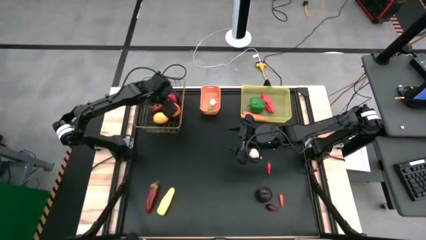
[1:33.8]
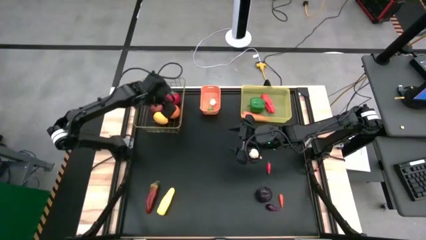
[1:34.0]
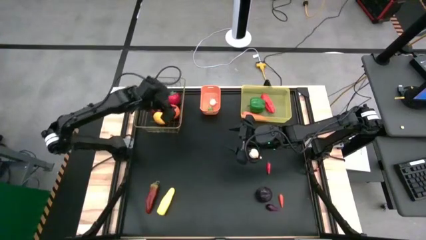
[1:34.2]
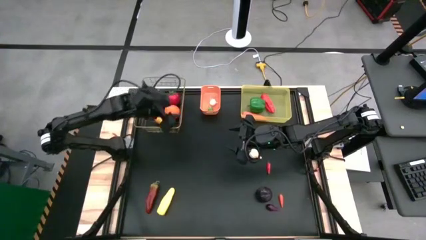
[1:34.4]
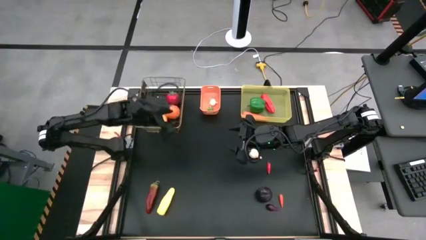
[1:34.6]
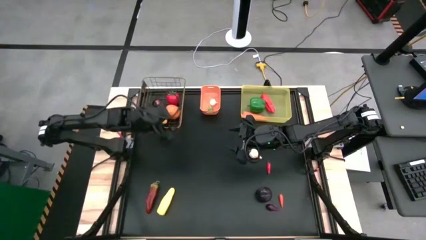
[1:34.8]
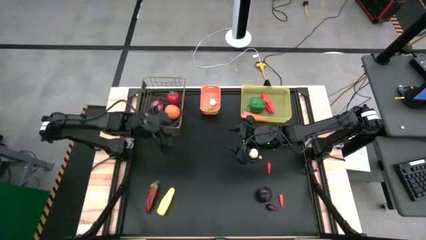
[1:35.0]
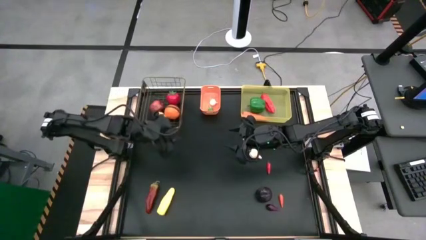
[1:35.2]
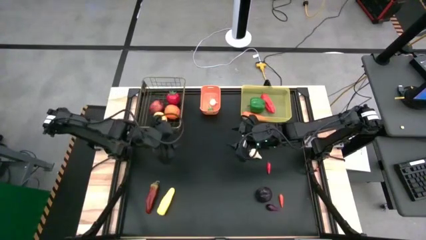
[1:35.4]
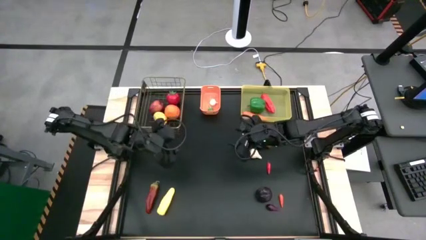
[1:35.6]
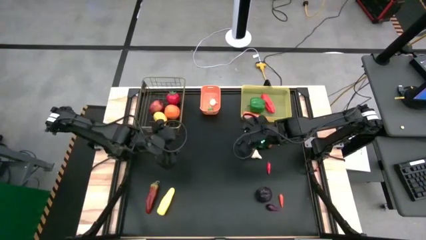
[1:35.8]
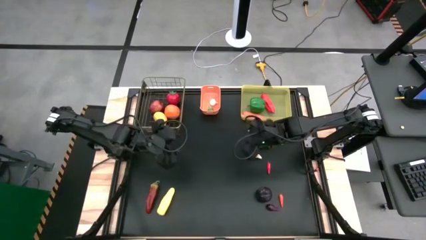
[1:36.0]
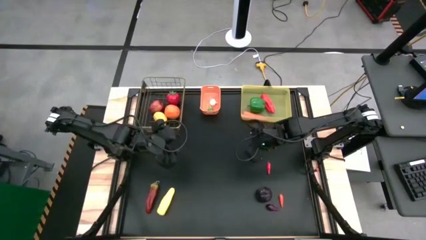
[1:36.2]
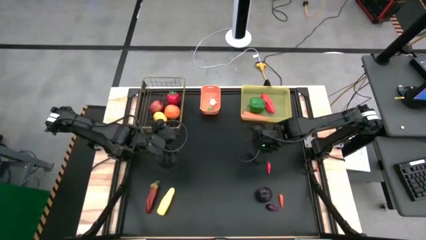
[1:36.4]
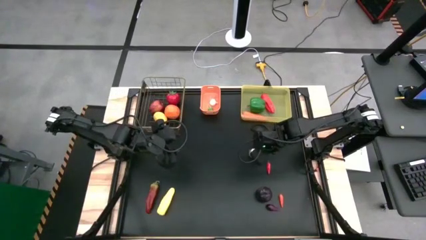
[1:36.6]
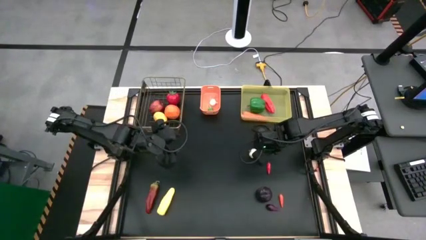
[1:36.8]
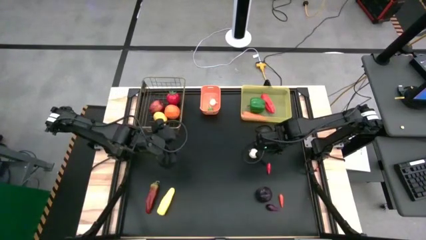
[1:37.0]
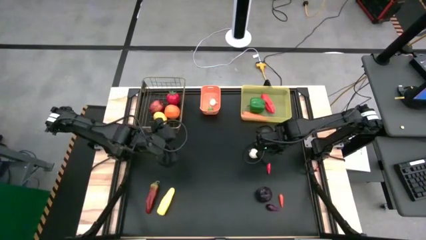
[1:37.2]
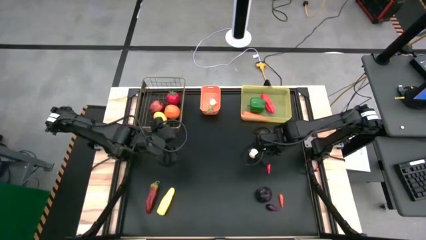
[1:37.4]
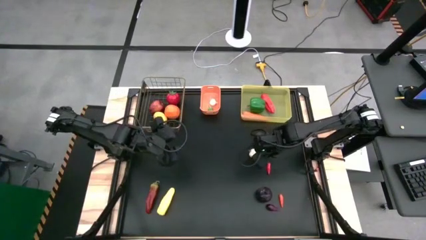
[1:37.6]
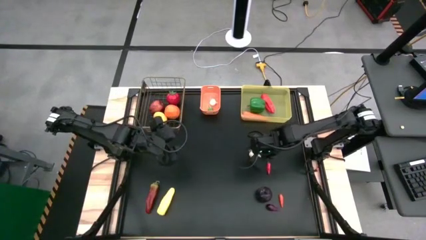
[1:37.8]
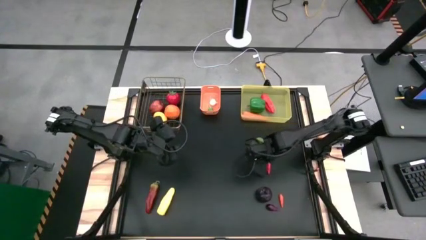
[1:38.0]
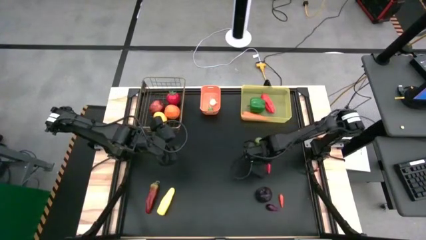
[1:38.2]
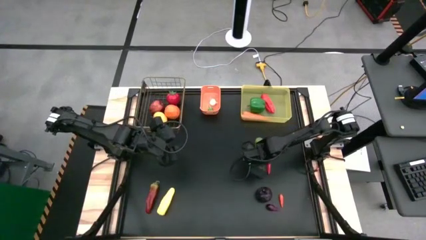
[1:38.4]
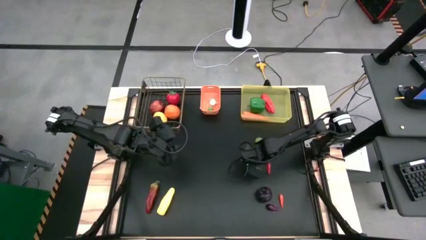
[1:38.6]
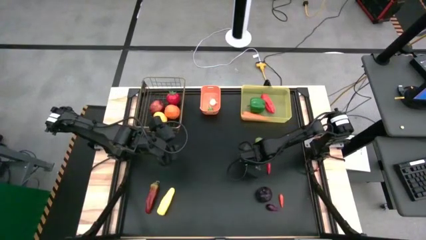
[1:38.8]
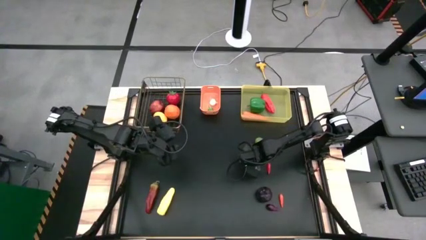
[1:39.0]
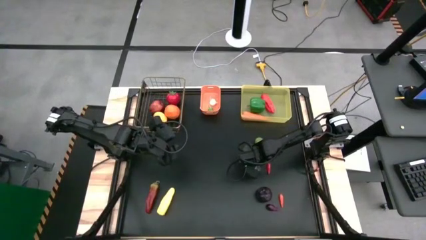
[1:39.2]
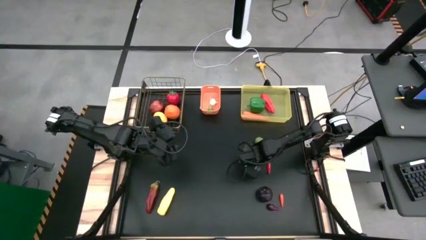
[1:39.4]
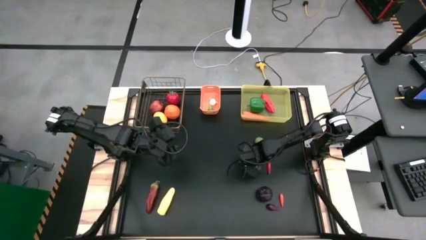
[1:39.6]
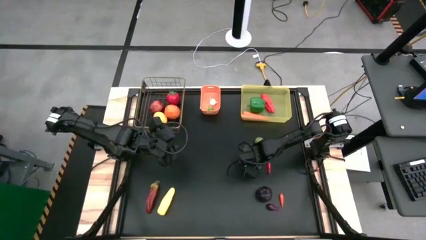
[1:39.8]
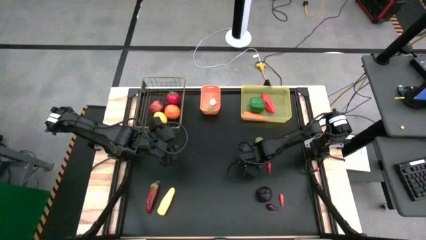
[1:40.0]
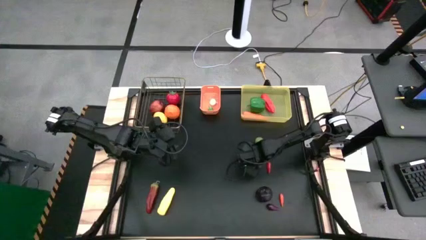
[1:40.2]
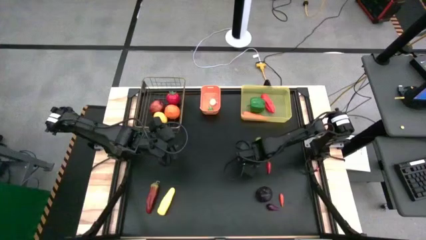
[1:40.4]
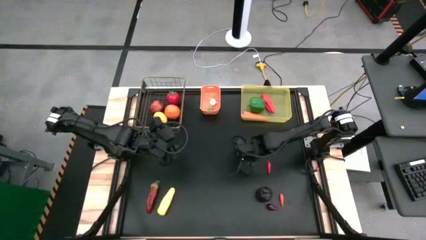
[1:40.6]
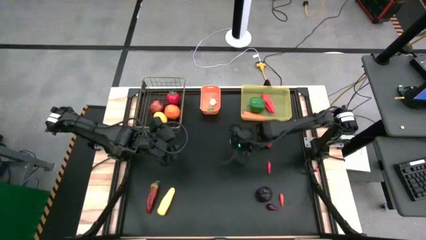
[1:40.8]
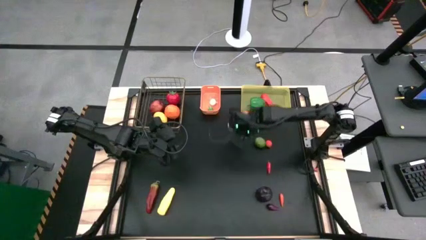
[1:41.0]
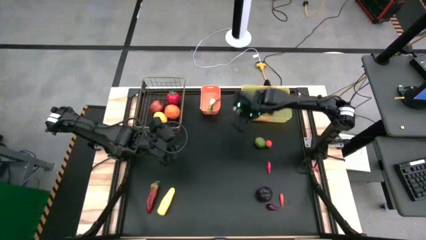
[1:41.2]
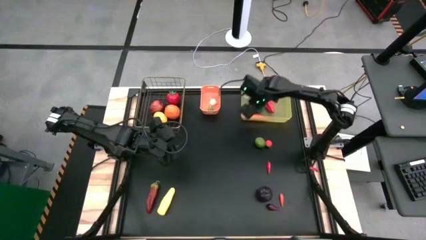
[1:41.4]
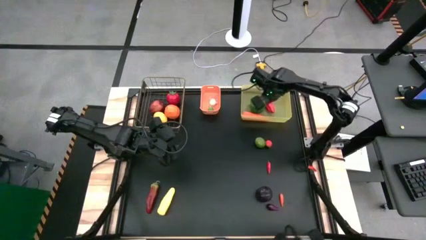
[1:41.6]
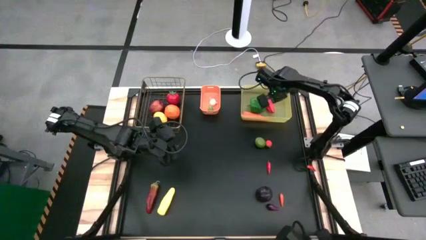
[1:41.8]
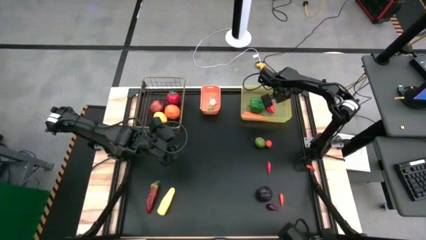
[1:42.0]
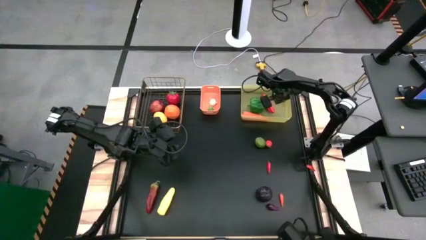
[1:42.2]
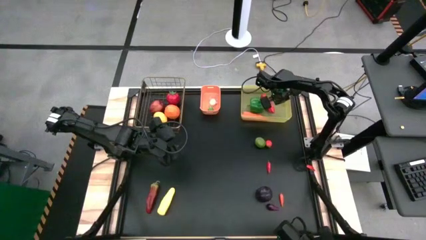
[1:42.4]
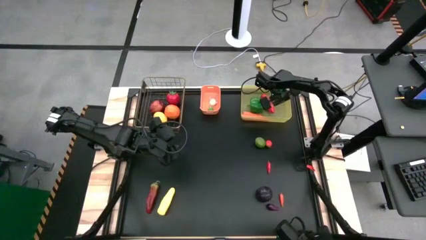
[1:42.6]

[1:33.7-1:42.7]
Task: Sort produce into baskets
Put the white garlic into the yellow bin

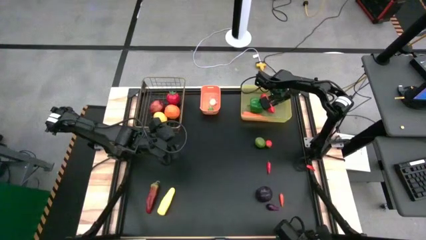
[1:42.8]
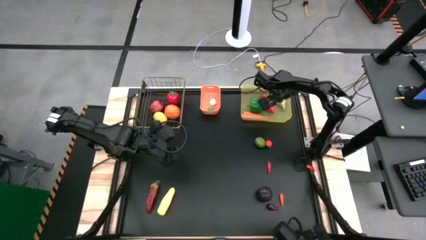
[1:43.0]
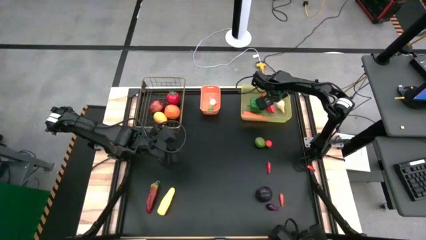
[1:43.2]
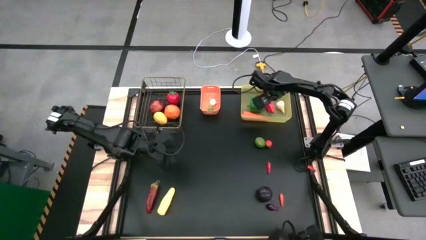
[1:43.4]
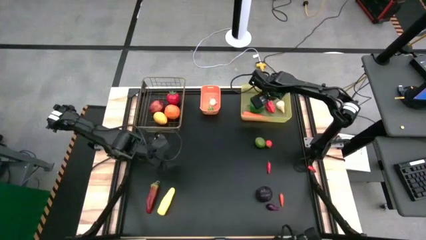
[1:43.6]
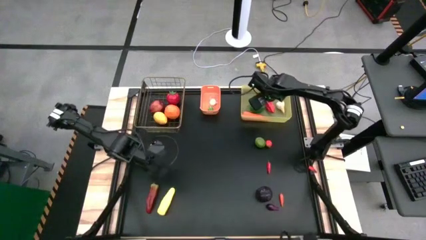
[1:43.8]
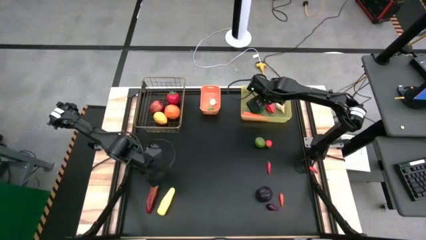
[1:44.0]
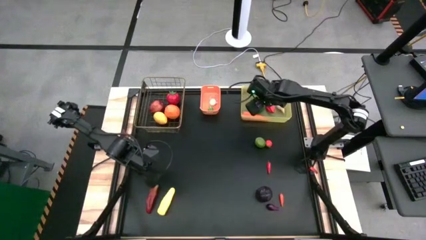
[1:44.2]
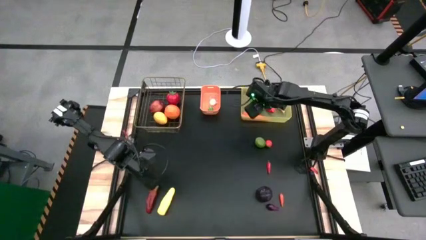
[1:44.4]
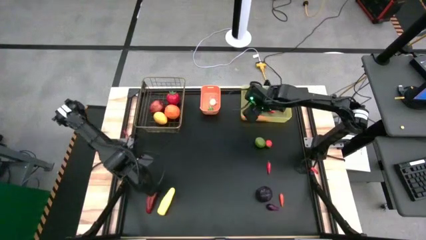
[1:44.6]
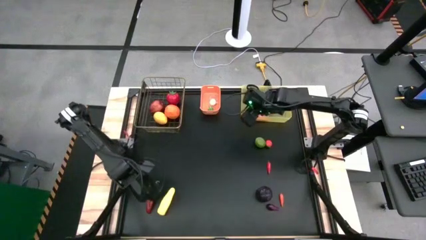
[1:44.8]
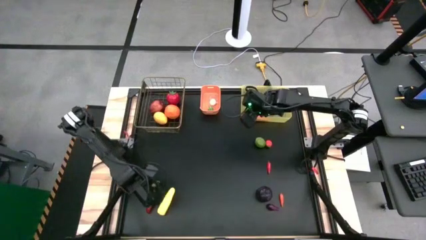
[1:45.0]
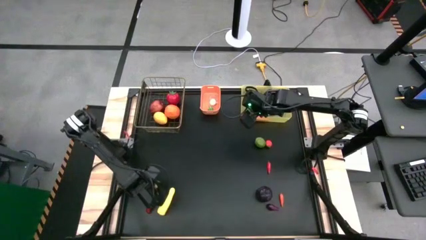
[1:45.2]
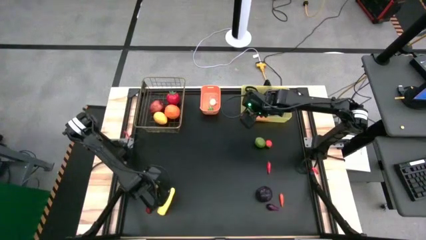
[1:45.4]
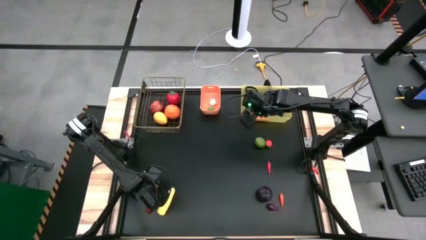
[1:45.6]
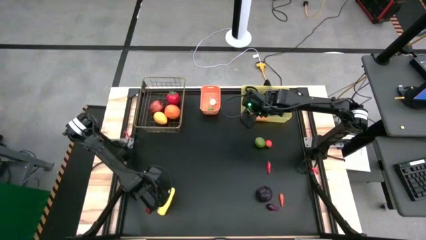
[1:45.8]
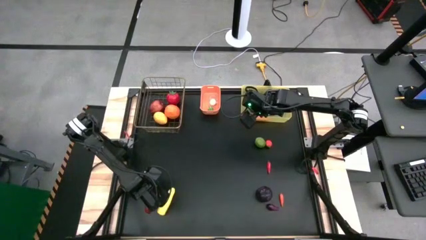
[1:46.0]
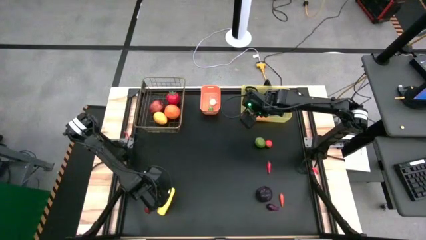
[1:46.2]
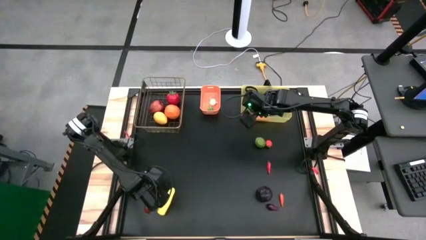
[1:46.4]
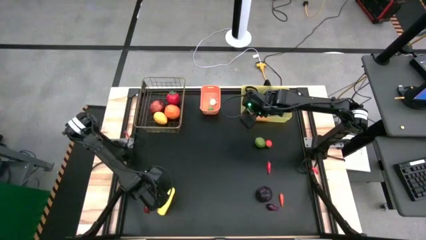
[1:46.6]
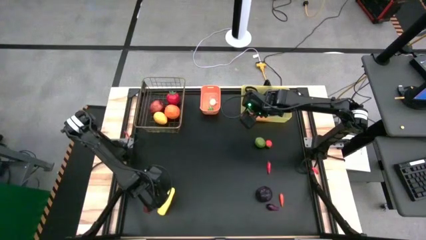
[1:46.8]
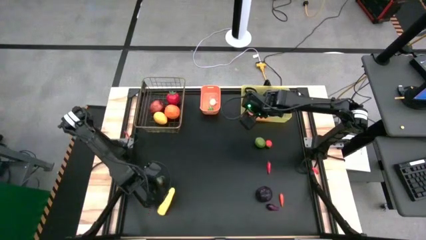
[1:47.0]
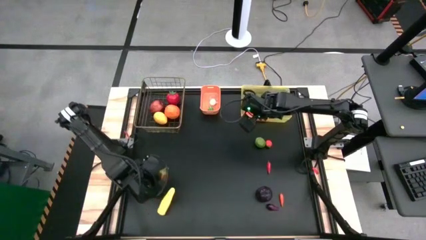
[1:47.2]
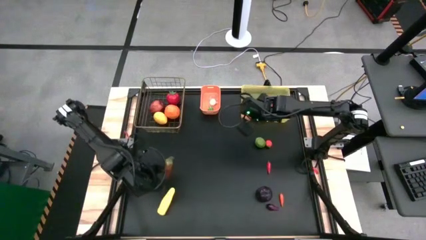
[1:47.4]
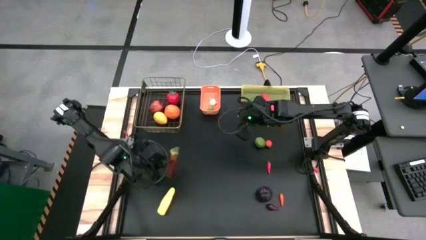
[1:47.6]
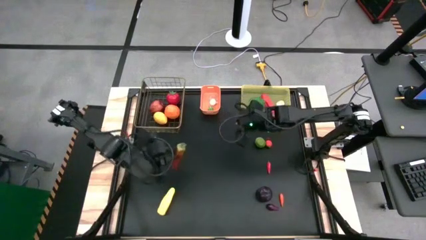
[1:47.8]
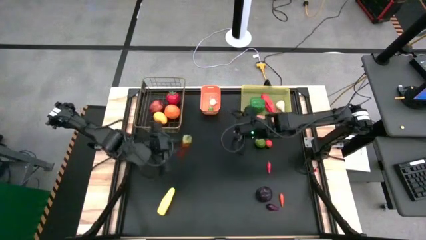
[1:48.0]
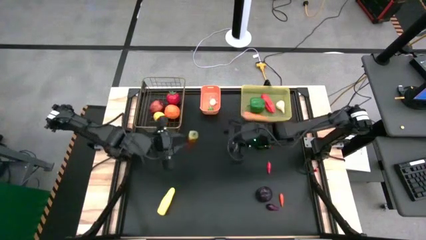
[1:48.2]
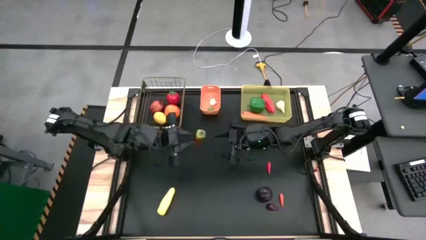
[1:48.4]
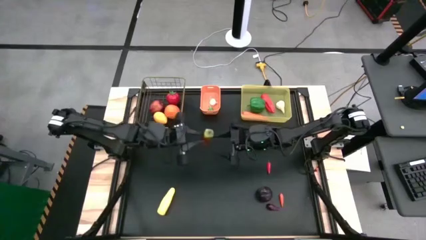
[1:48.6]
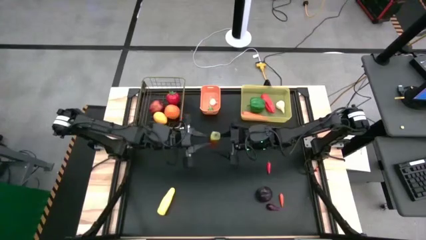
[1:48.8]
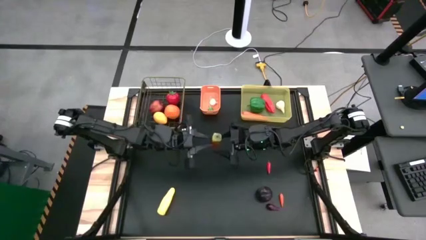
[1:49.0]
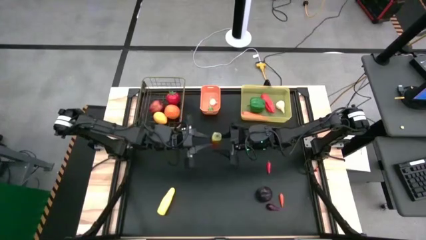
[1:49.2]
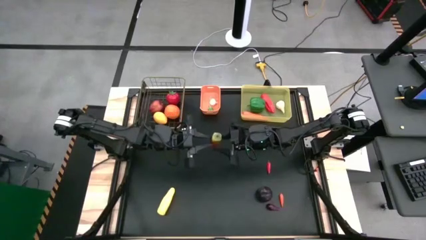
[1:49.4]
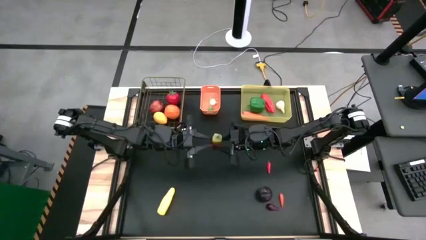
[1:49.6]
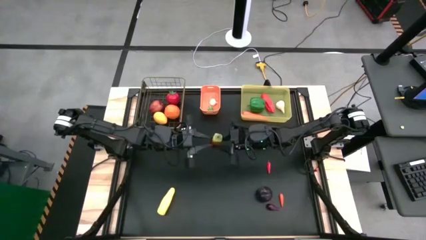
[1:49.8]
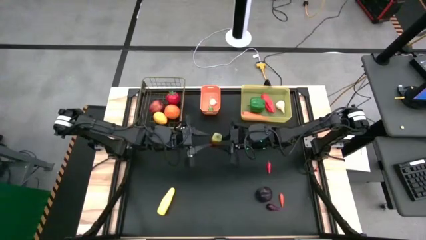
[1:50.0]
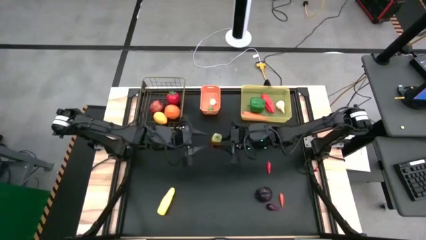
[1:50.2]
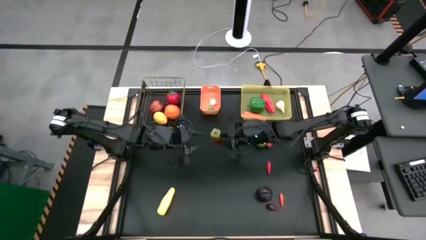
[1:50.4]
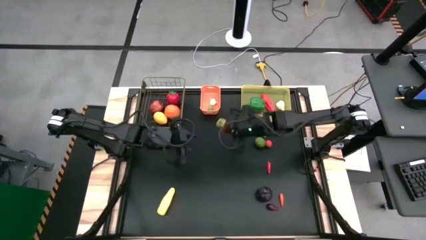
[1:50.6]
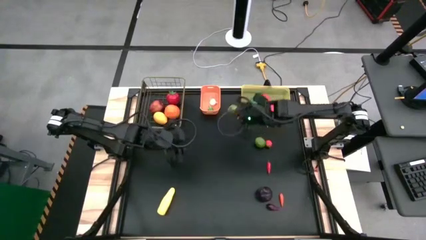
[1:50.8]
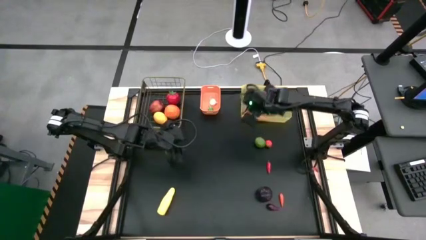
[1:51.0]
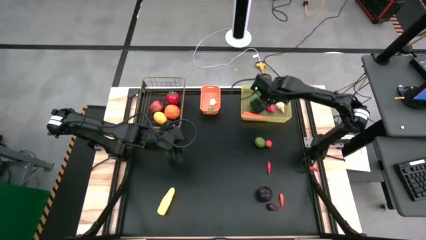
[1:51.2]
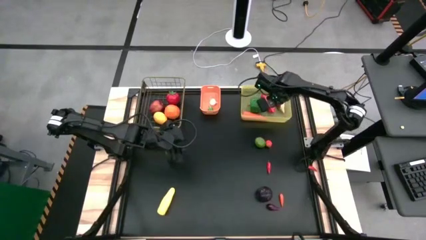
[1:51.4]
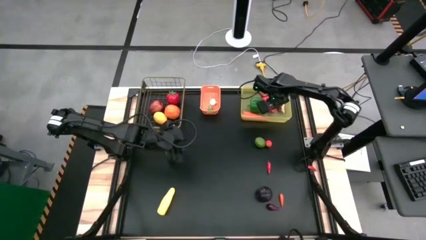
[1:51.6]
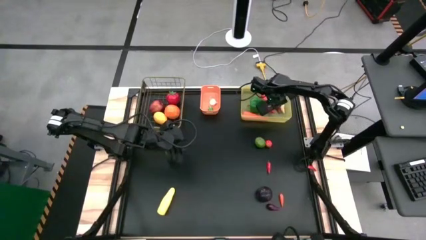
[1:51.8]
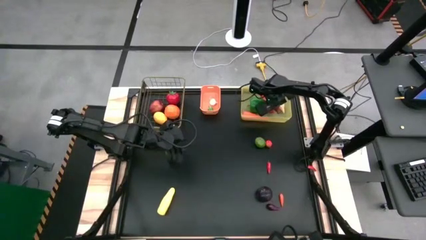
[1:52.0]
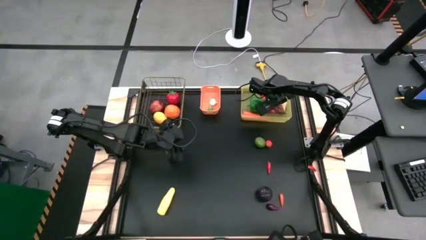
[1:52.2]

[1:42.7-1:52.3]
Put the dark red chili pepper into the yellow bin
